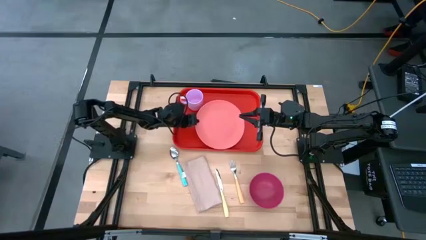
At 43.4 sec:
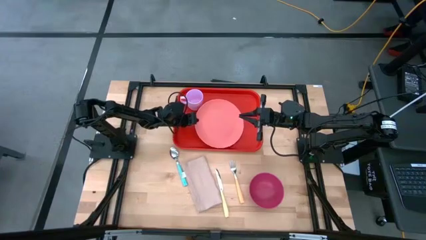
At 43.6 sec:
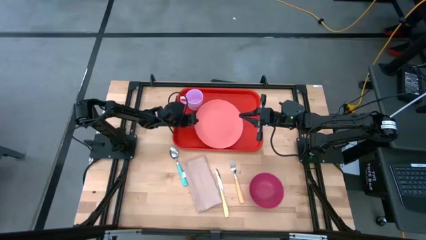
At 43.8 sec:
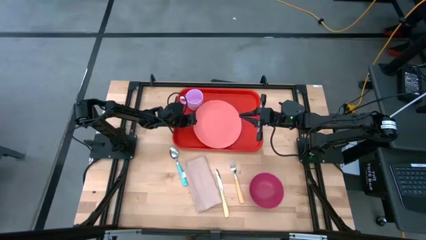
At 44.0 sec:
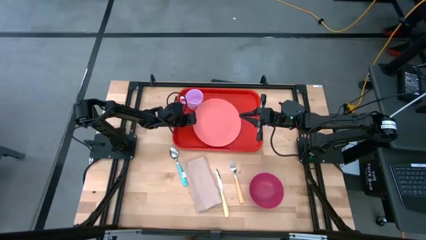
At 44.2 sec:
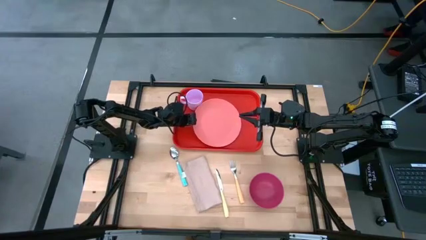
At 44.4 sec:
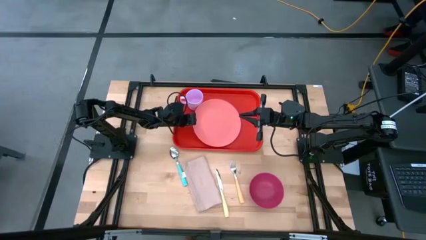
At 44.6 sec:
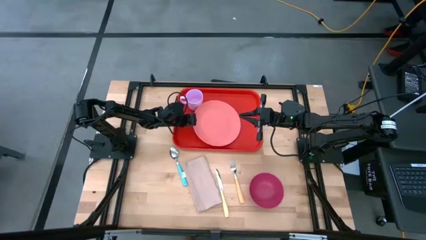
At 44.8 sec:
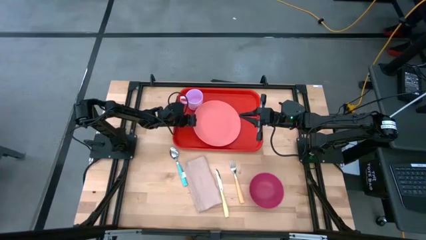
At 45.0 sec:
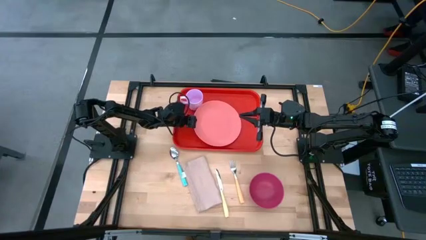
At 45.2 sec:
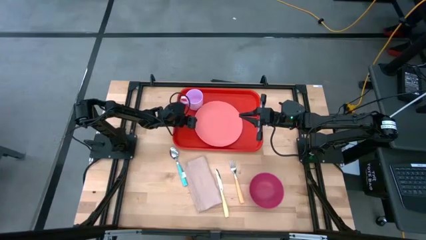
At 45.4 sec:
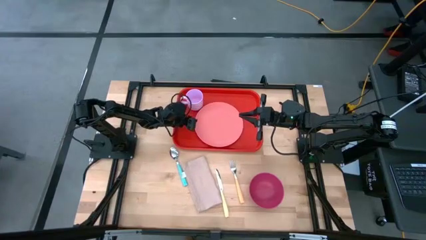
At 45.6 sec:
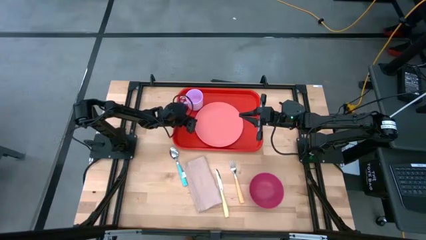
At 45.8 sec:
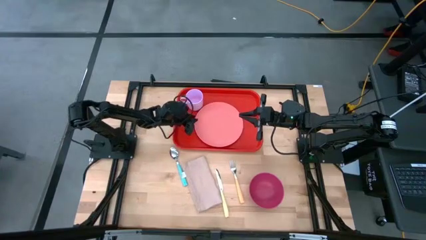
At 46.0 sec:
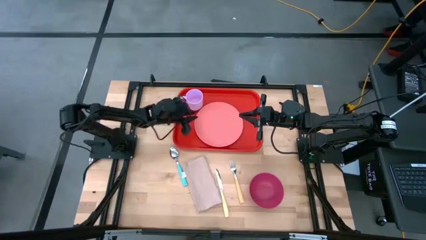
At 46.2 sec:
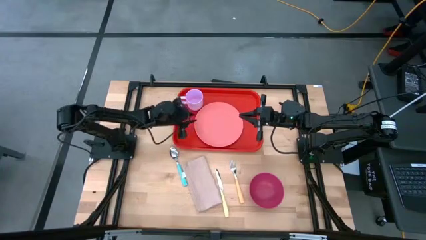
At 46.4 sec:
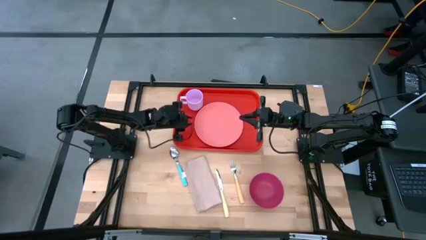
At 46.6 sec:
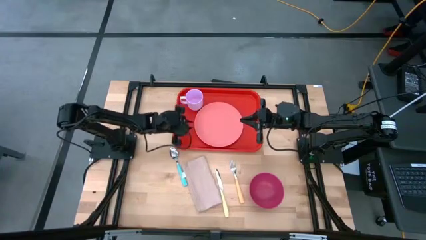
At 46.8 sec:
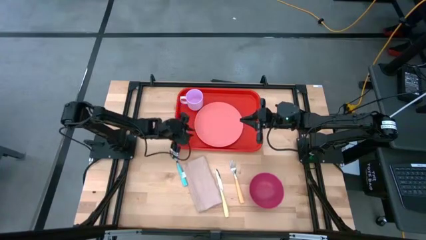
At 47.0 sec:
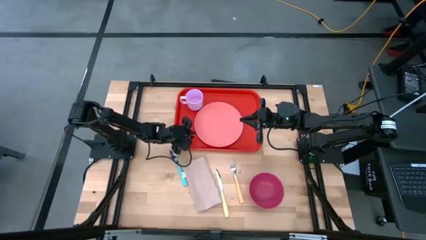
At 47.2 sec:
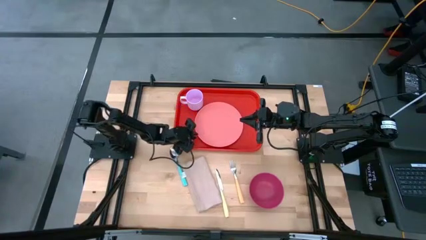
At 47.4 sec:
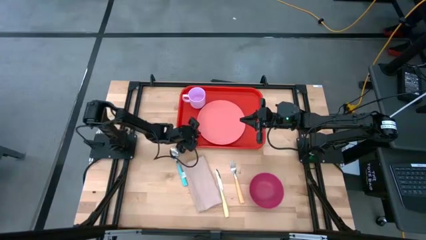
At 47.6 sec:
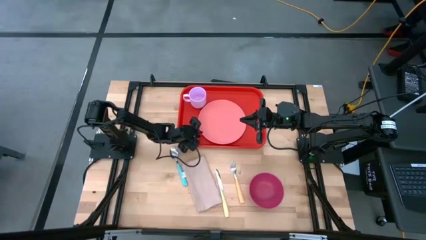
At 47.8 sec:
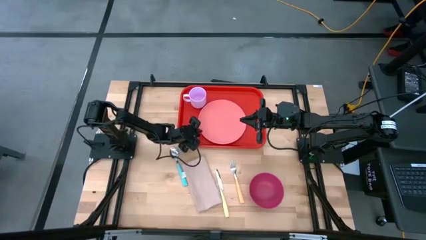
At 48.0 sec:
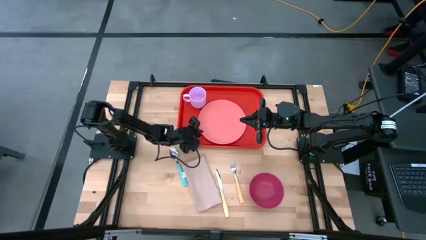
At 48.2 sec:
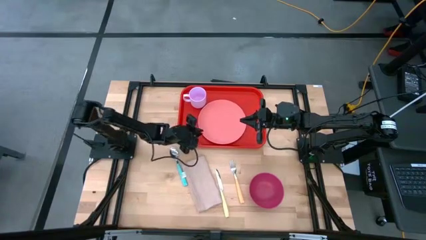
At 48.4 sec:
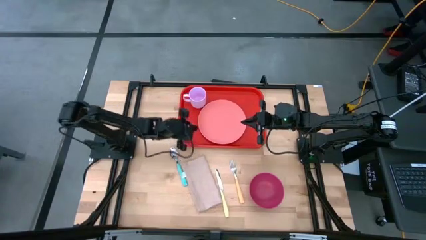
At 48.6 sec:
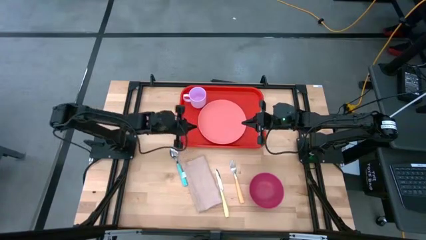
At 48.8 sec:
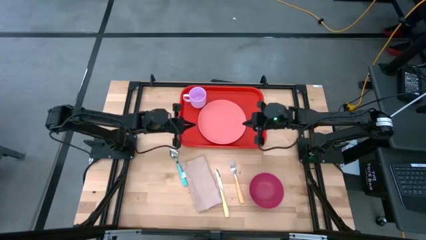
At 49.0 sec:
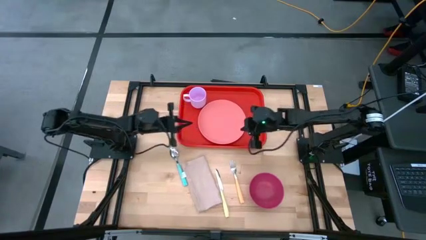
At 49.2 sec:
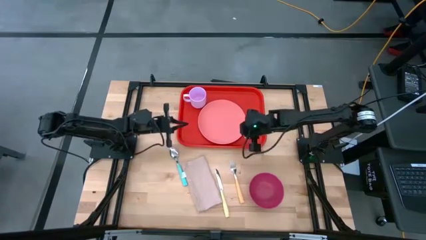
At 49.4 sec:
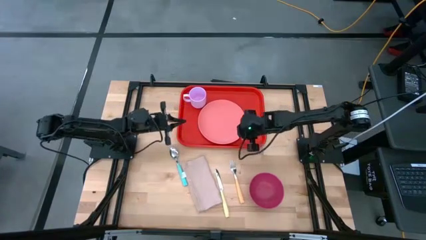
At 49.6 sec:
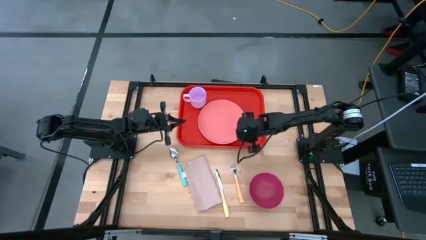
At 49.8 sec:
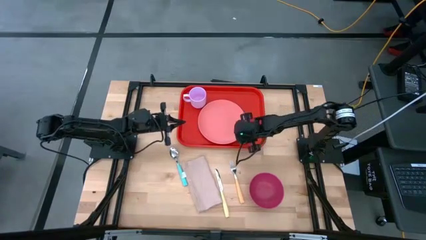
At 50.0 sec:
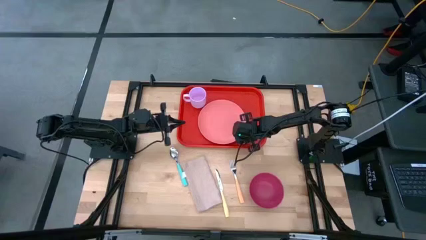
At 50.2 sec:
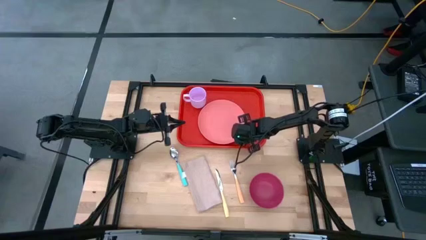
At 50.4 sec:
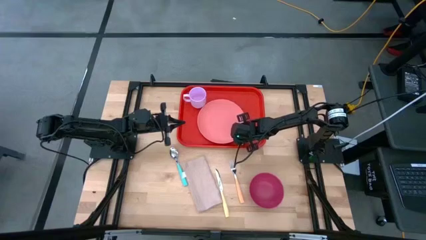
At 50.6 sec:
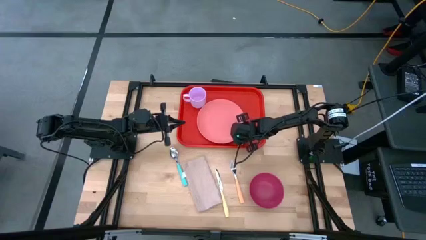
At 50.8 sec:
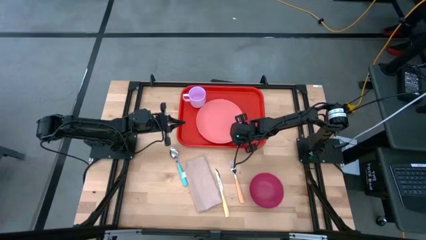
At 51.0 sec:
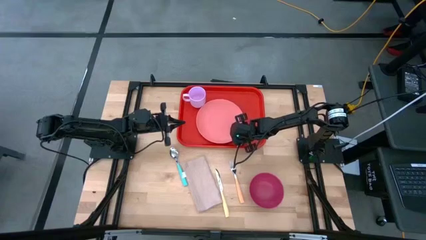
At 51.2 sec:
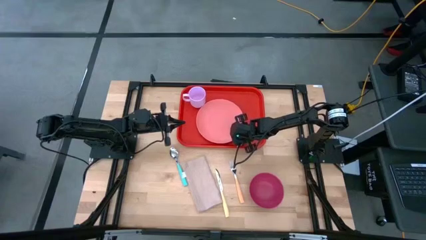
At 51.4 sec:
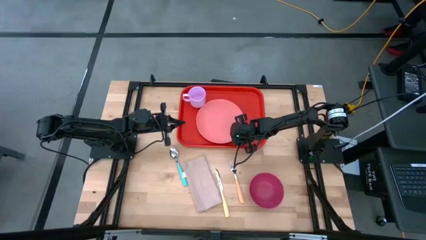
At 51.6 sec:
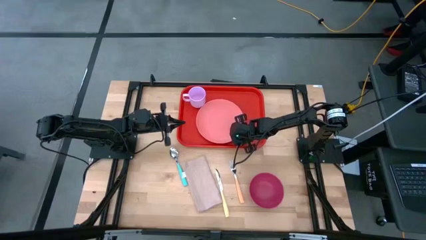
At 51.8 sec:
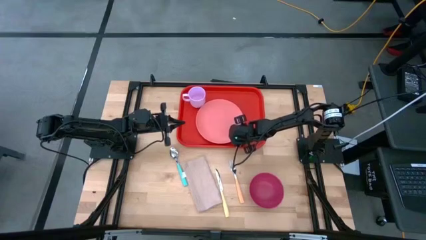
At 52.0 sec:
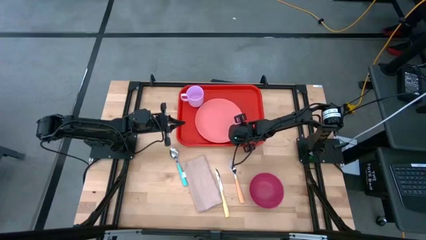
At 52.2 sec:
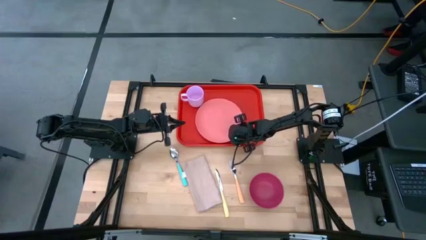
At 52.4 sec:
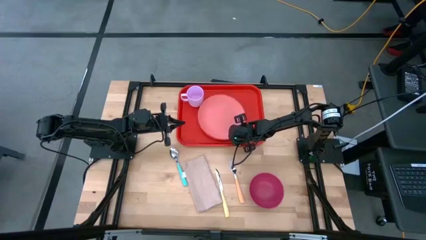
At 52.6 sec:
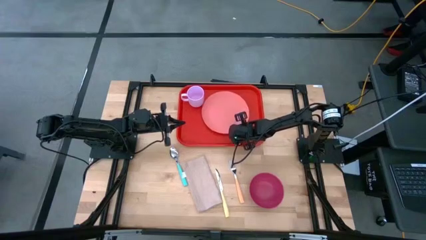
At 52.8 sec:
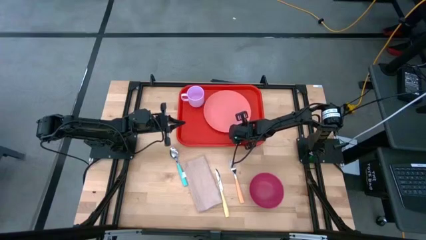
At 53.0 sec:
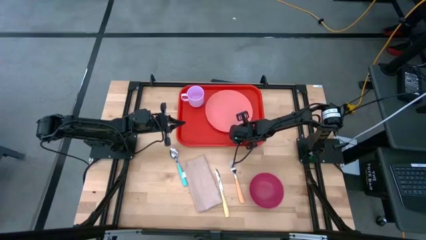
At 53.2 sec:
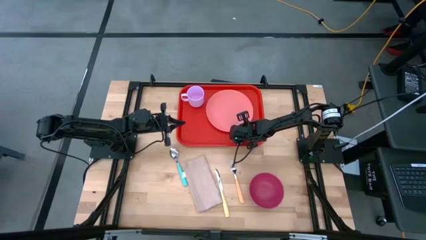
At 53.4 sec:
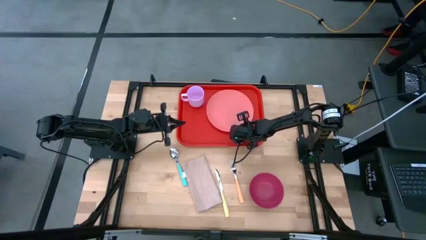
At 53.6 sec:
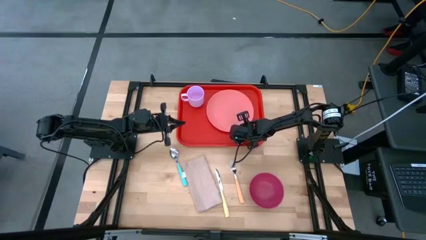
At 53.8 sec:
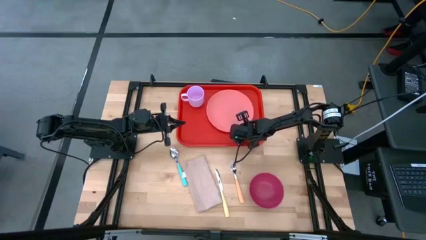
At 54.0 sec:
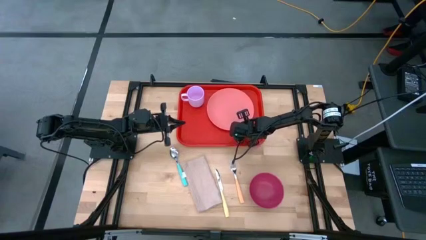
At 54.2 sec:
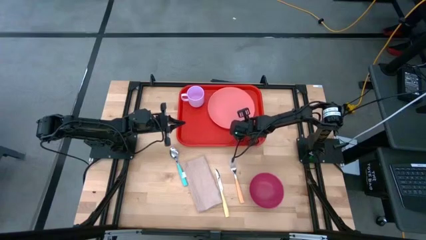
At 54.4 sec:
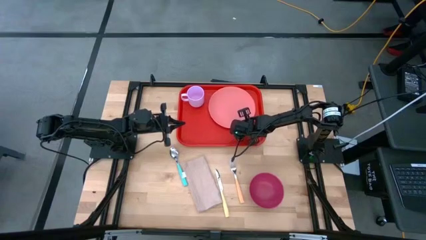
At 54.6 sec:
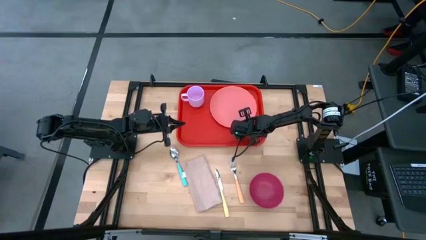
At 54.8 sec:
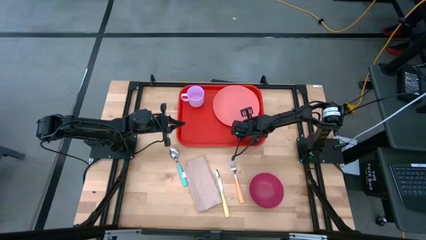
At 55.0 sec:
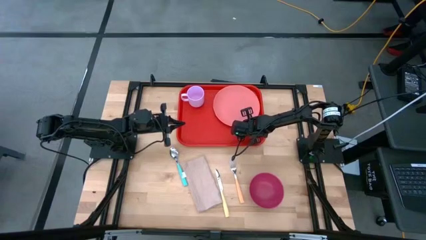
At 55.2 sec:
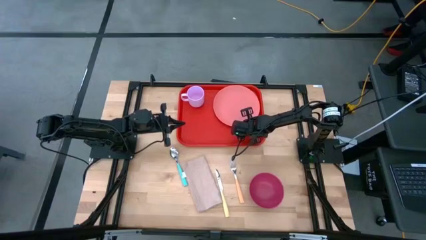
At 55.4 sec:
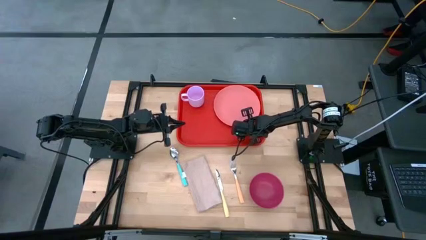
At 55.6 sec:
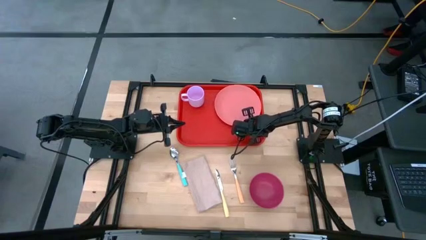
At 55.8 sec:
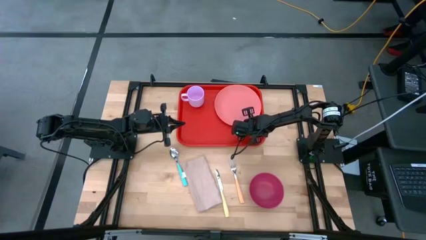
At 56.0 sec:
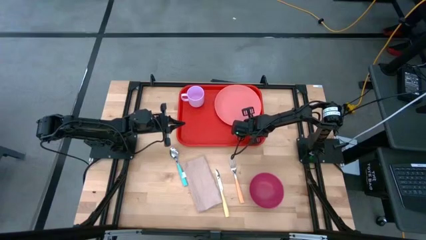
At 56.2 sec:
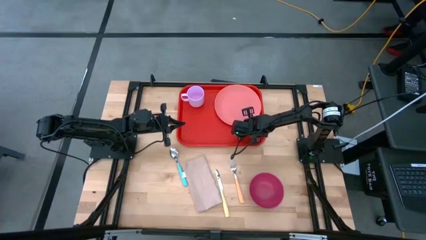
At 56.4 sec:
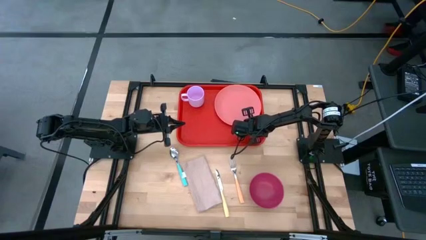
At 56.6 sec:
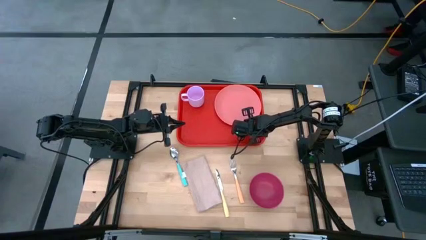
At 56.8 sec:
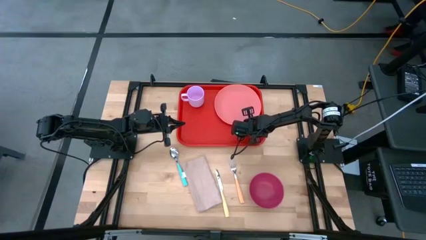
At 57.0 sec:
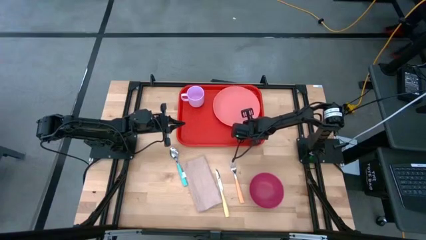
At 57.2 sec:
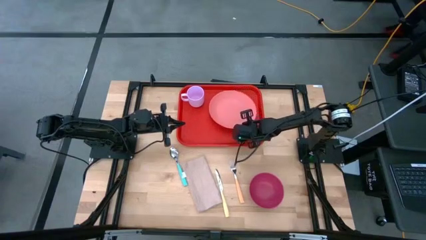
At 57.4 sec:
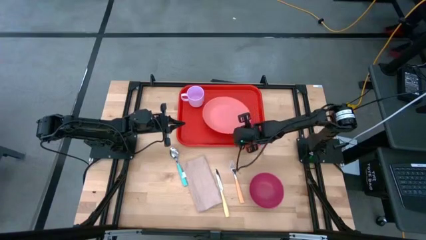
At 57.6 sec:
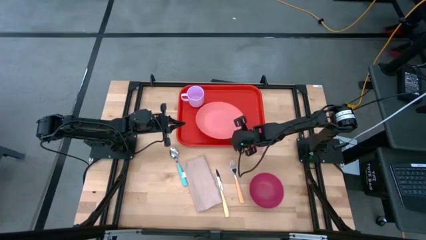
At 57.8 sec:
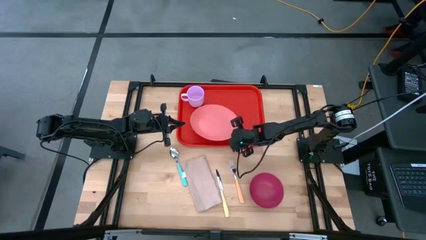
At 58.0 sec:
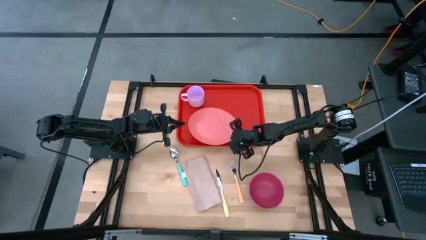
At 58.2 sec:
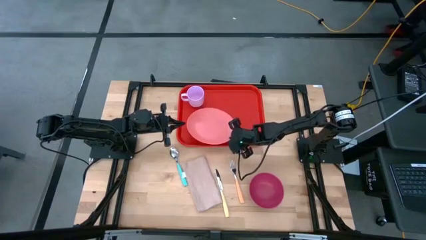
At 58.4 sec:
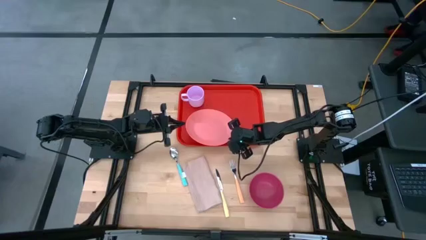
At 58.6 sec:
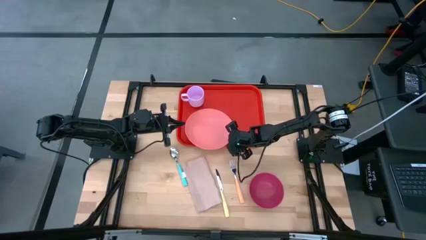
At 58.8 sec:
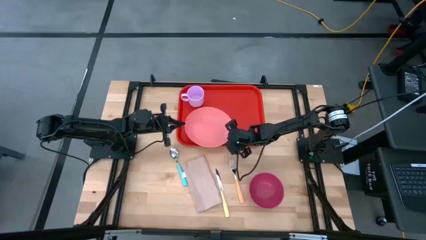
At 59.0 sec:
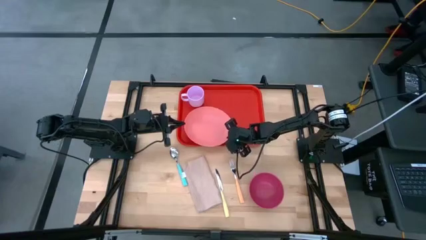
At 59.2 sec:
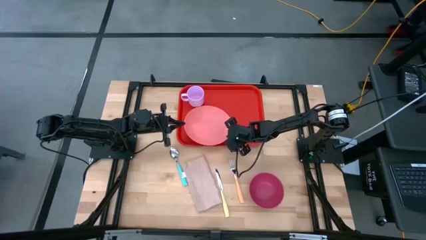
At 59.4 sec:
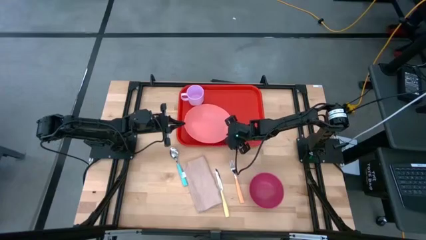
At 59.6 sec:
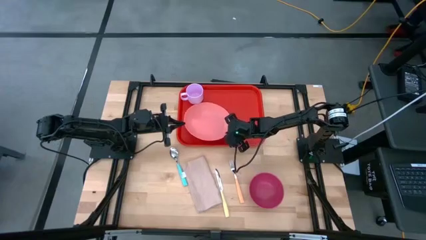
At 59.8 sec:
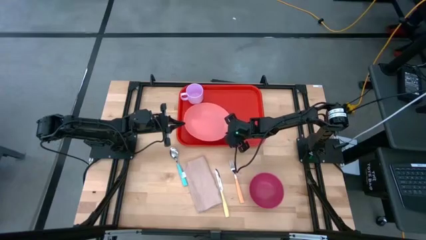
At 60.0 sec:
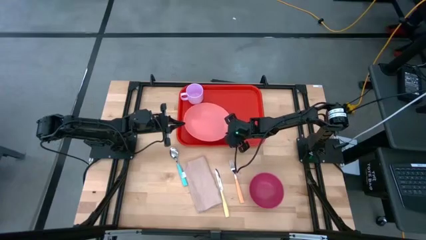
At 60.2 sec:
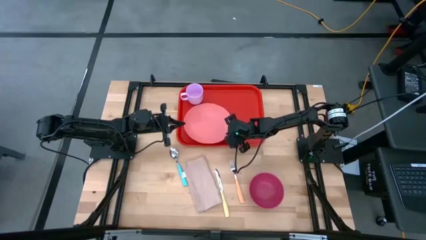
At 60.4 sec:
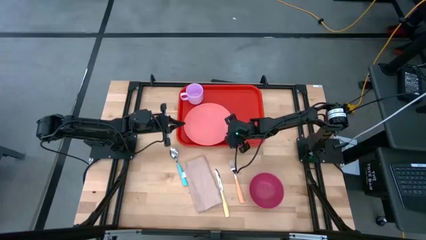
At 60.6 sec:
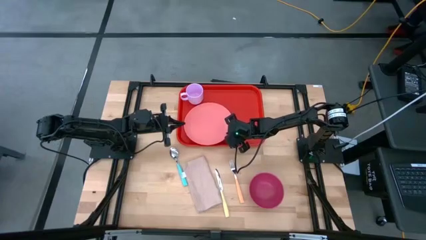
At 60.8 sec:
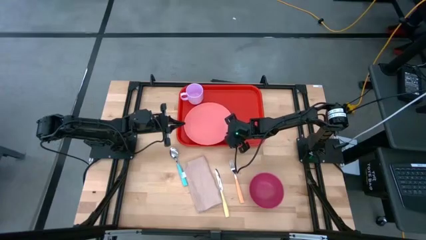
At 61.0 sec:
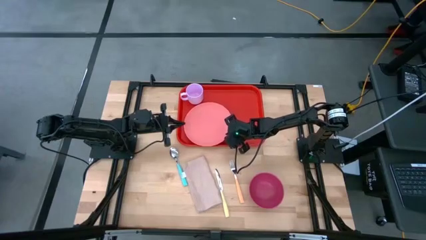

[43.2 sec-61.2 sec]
Task: Set up tray
Put the light pink plate in the middle of the red tray
